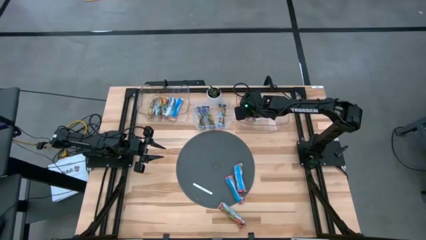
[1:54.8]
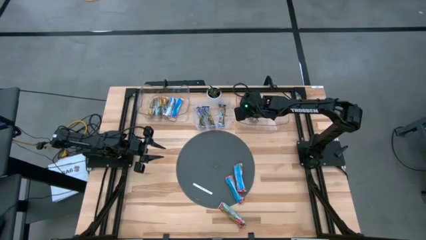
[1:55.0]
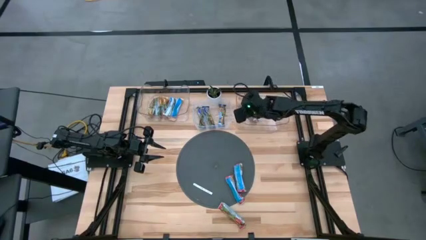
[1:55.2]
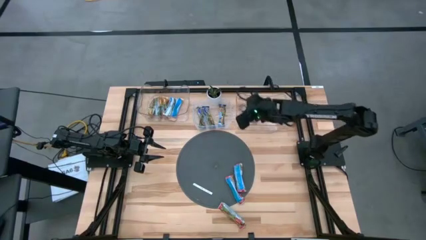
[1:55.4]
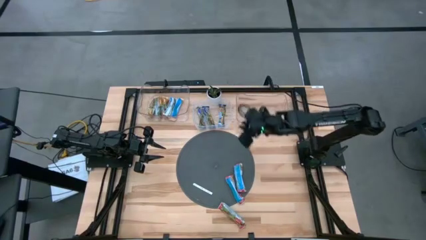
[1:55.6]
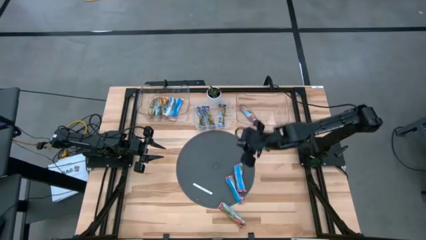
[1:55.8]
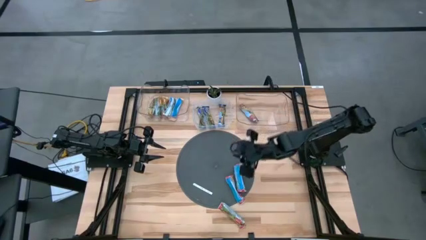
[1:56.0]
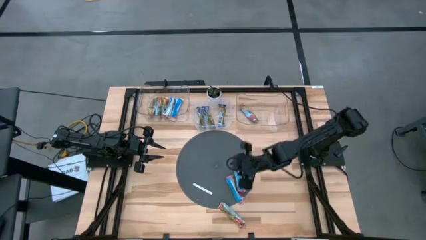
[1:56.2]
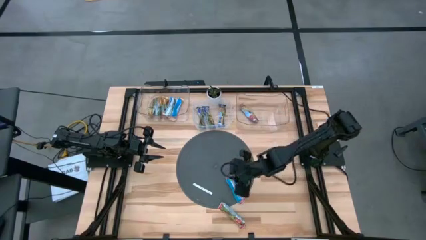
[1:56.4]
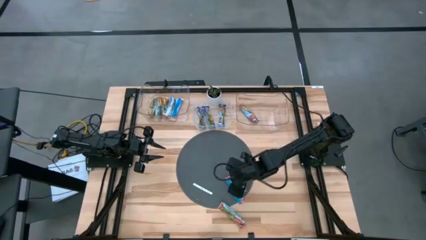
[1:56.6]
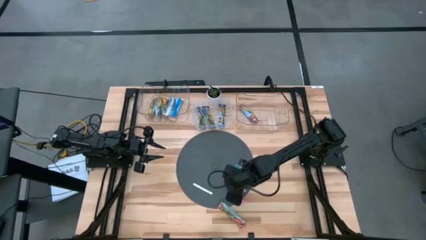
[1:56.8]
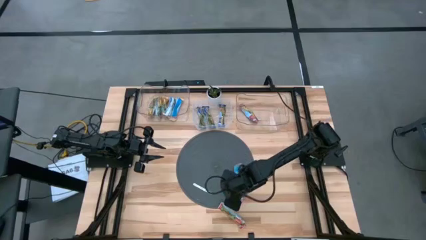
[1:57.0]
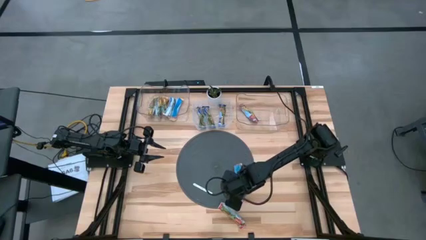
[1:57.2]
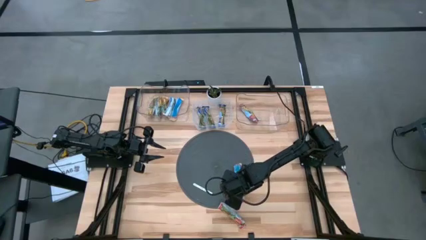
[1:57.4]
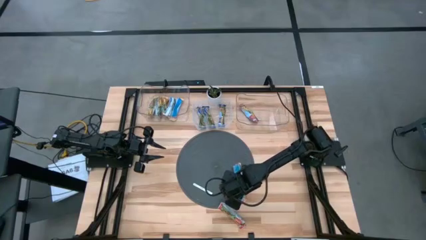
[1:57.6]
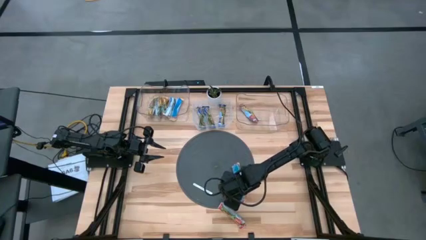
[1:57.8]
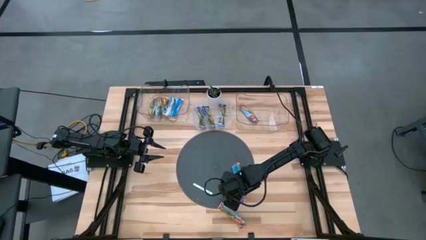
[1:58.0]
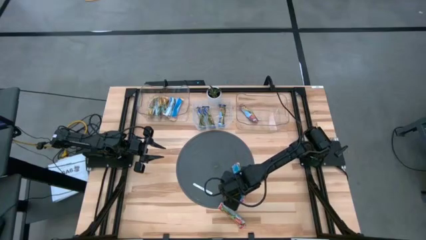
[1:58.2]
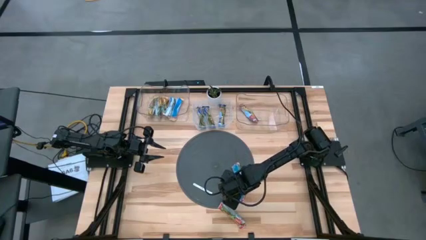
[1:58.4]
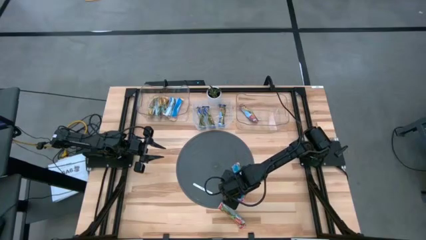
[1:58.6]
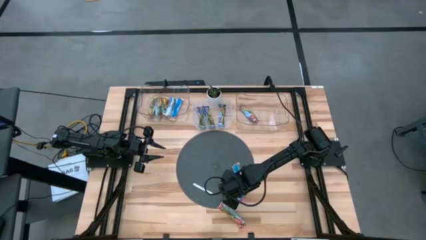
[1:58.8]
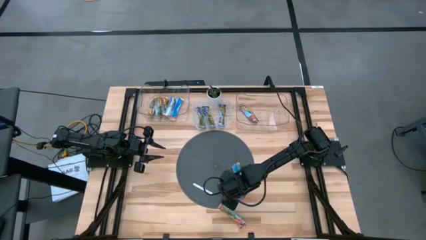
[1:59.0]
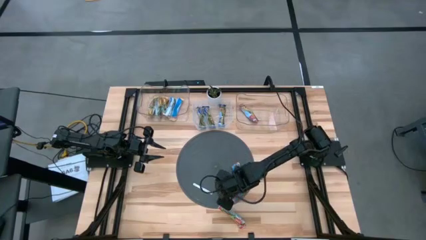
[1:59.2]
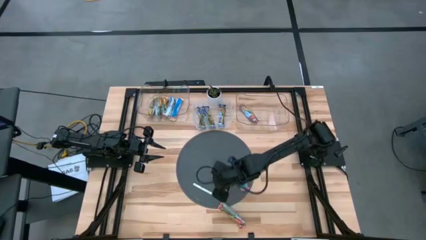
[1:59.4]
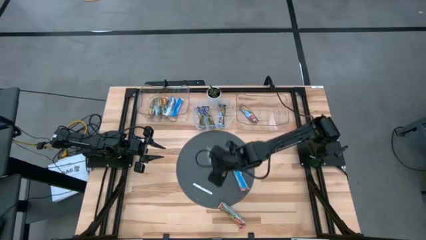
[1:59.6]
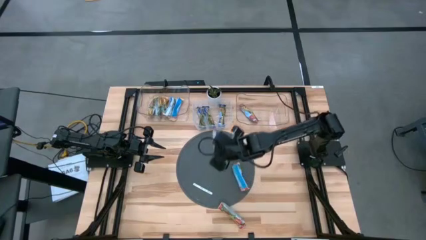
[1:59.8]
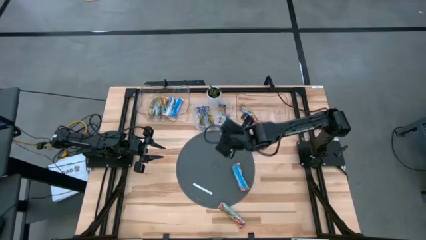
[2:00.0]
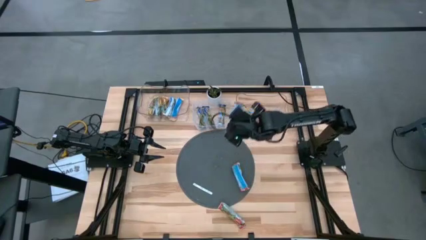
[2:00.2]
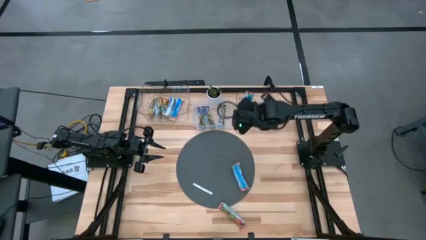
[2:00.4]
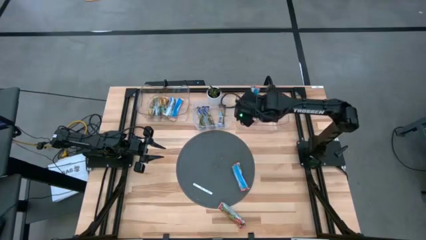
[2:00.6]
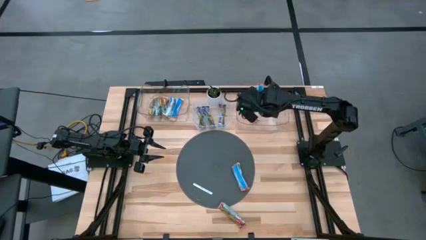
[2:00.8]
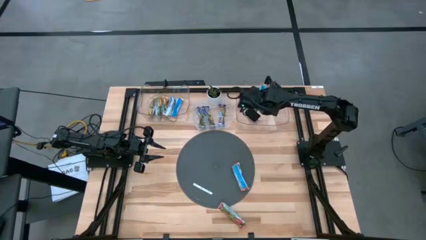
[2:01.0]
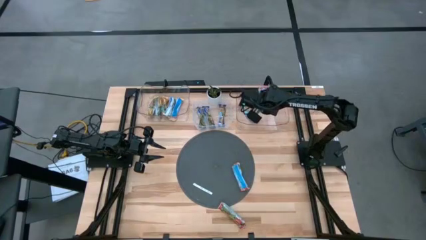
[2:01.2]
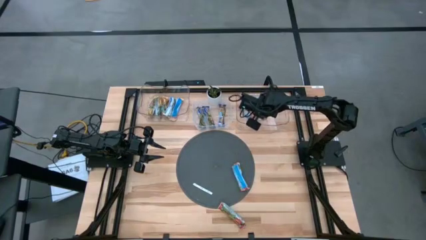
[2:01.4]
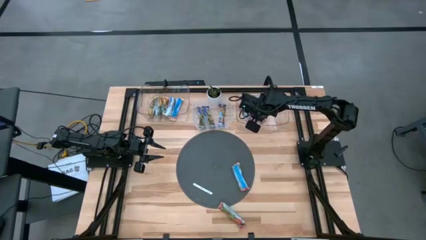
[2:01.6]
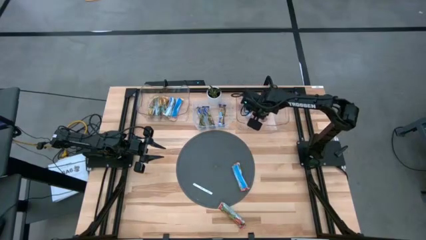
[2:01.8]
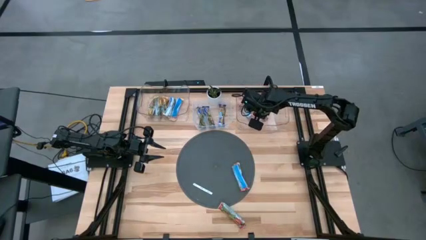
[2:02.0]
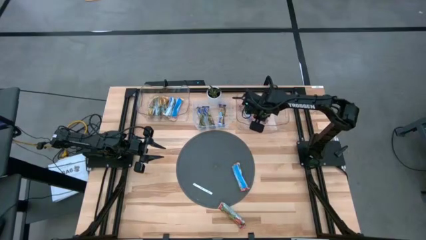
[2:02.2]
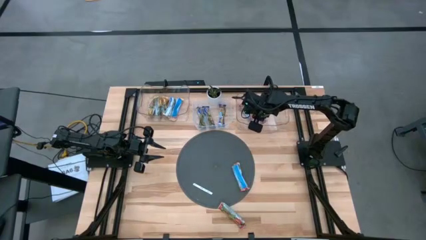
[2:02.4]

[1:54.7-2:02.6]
Task: Pick and place Granola Bars by type
Put the red granola bar into the right transparent bin

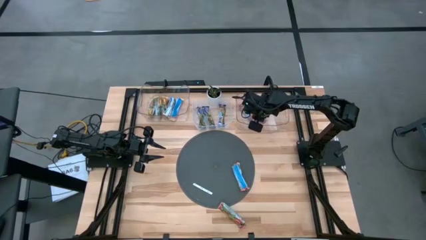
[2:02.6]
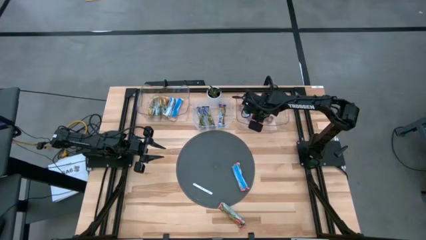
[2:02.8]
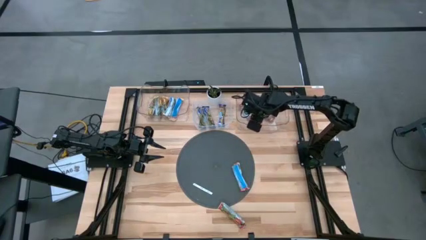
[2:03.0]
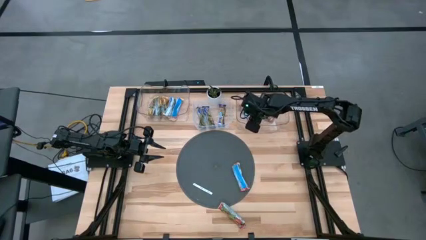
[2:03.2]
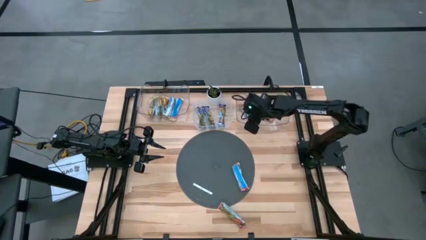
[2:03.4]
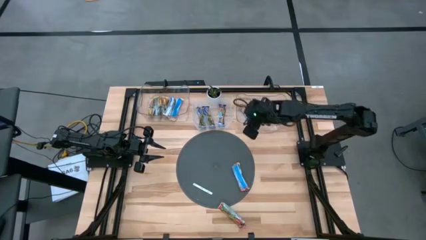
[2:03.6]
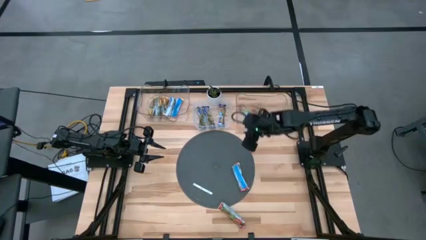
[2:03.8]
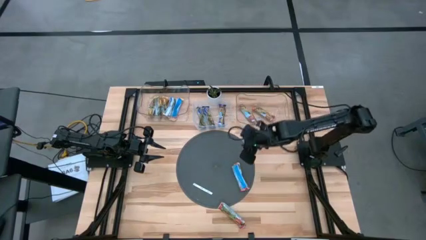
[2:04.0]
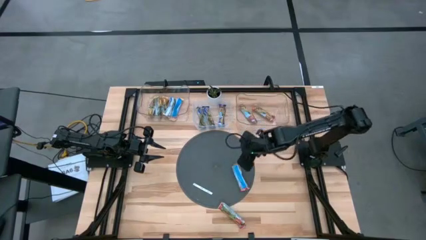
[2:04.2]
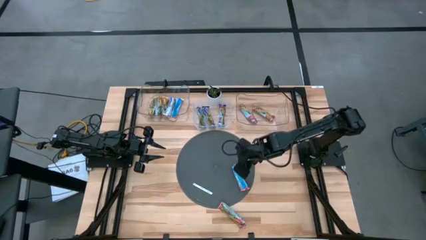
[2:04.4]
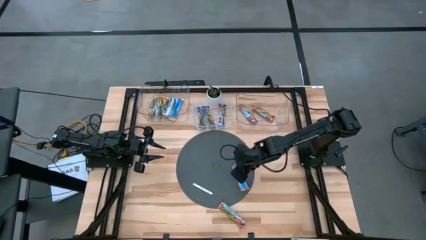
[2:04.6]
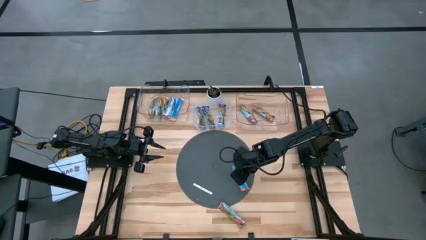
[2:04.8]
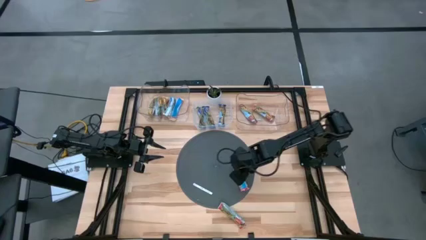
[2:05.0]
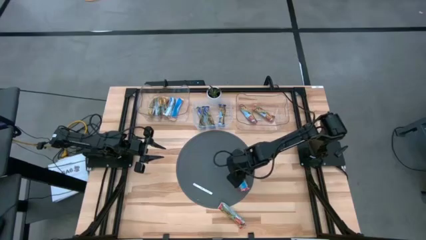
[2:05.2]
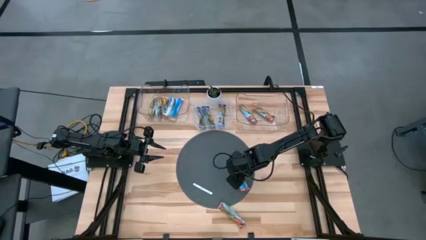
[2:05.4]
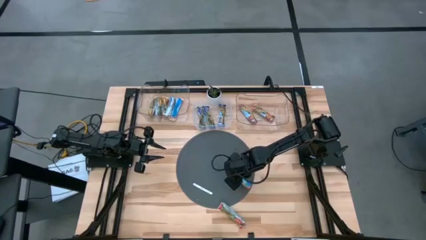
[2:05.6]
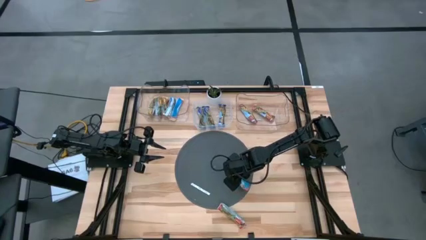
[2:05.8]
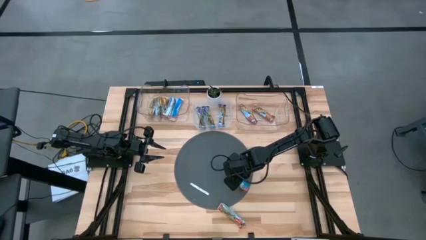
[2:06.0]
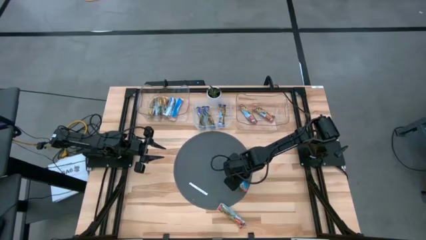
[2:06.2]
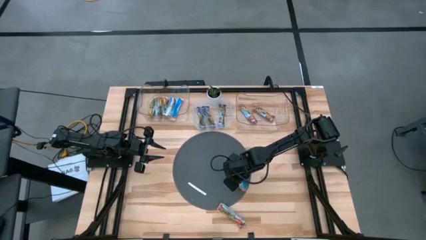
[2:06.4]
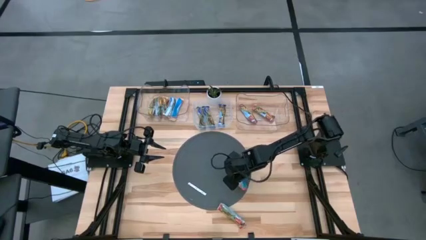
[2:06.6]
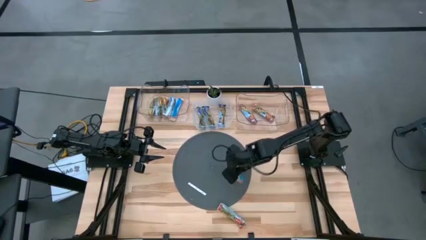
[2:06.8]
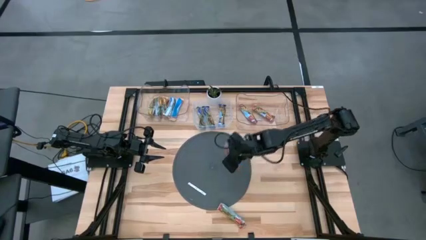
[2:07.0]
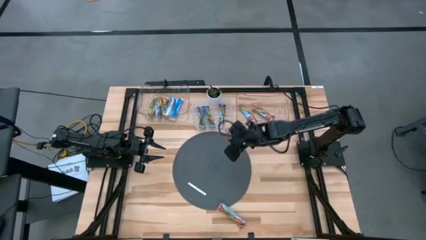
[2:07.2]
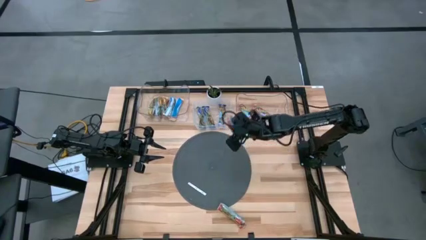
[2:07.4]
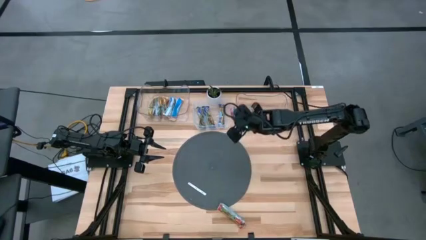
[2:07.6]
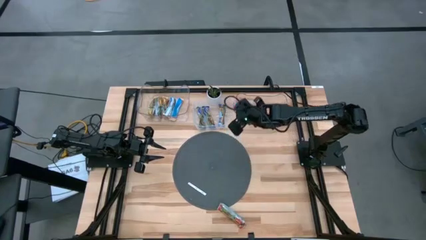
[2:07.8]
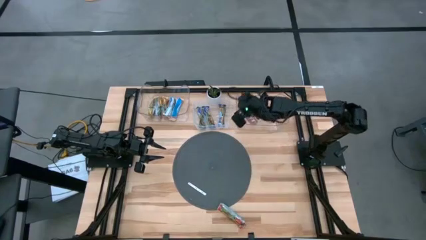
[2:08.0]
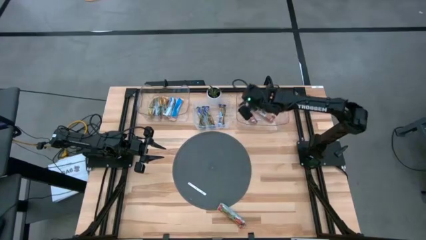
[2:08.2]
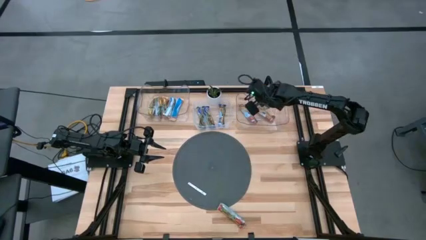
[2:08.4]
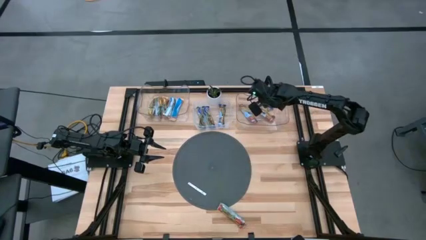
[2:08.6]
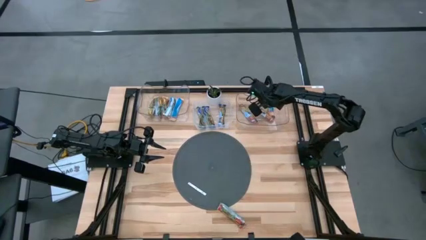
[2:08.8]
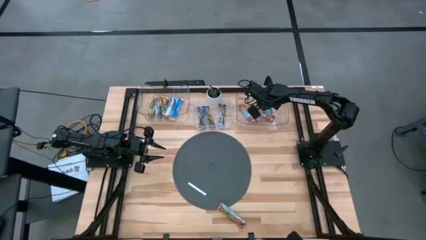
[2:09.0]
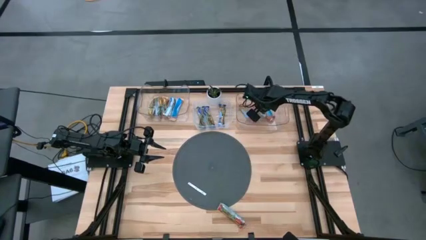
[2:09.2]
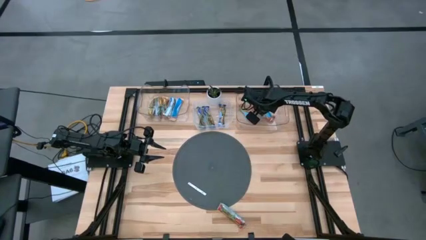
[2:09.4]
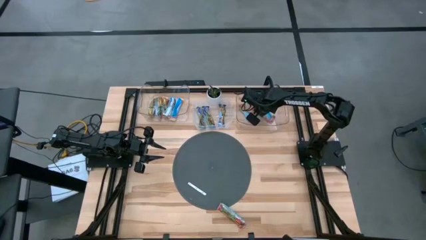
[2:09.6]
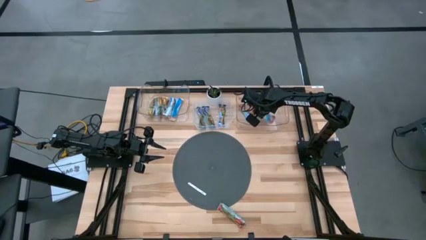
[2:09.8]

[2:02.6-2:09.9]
Put the red granola bar into the right transparent bin

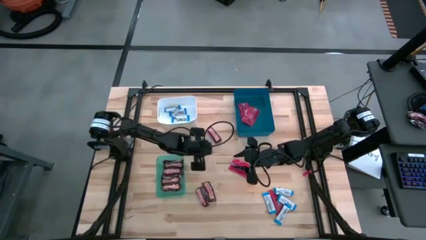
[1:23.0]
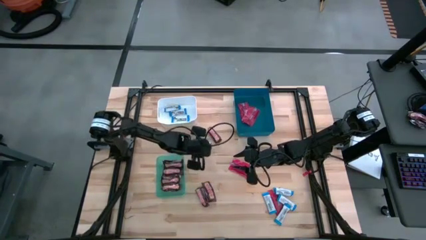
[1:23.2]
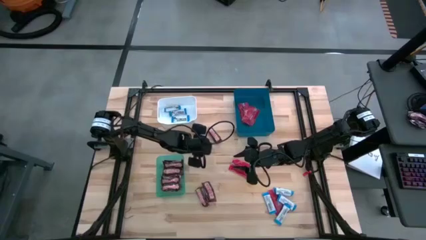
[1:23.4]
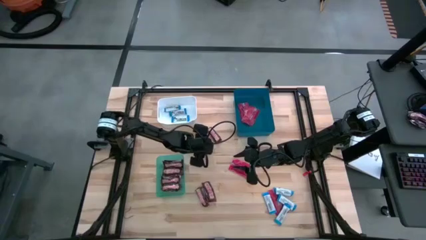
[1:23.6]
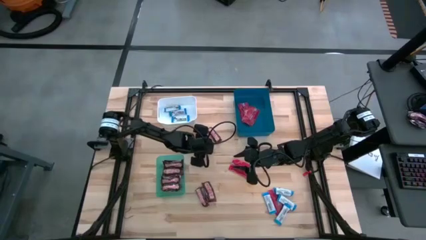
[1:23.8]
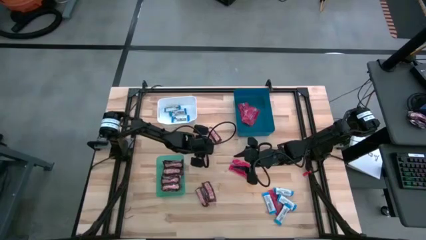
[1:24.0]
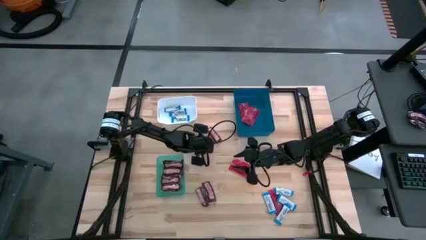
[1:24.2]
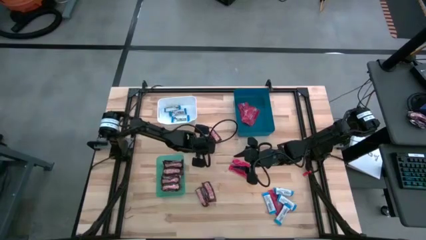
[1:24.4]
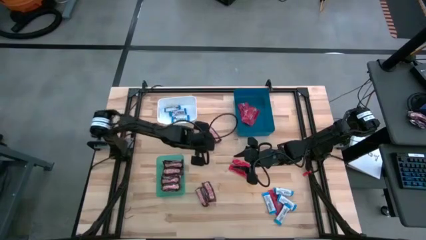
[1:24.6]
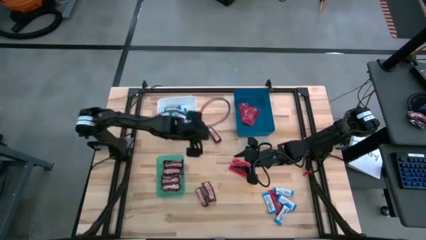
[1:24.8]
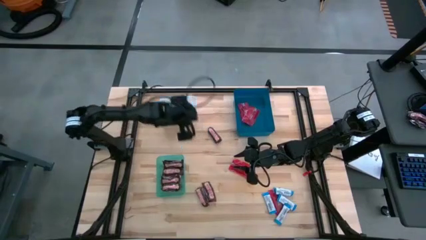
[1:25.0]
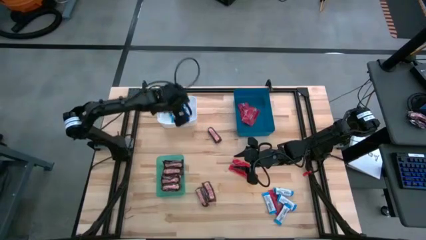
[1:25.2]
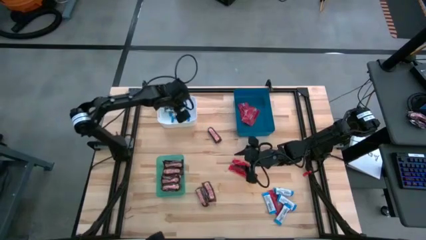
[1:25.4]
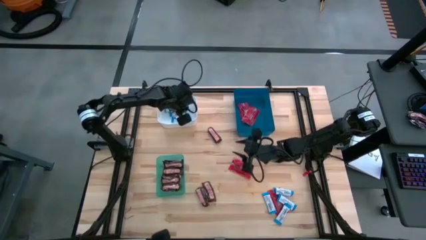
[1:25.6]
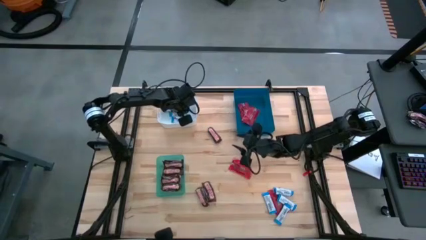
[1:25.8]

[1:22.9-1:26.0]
Task: Sort candy
Put the white chocolate bar into the white bin
